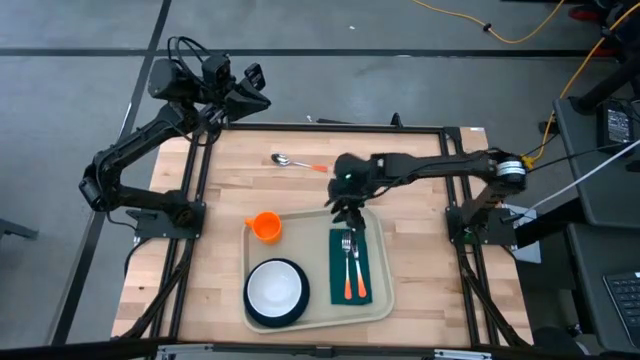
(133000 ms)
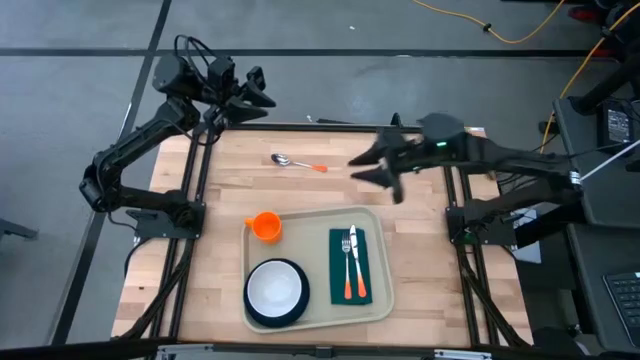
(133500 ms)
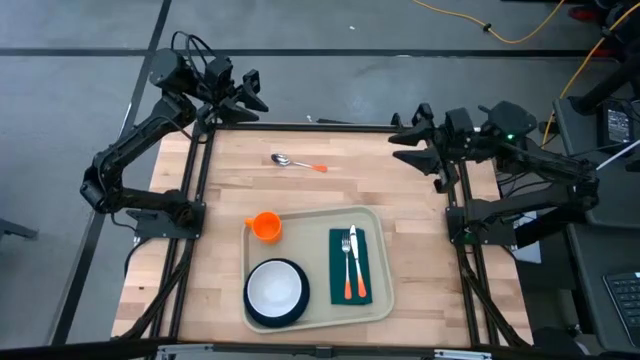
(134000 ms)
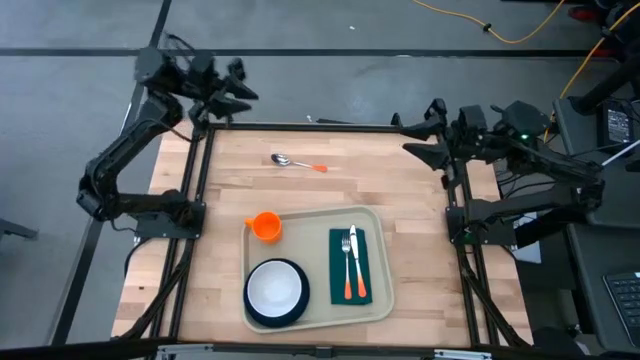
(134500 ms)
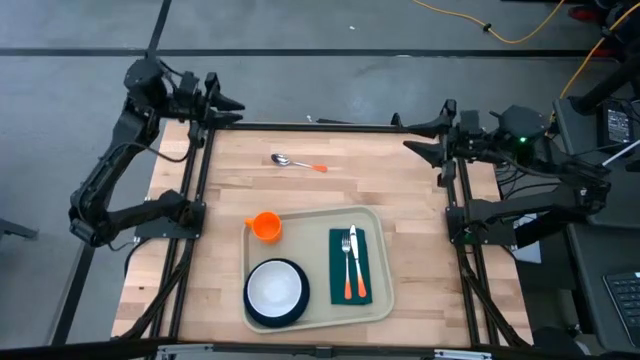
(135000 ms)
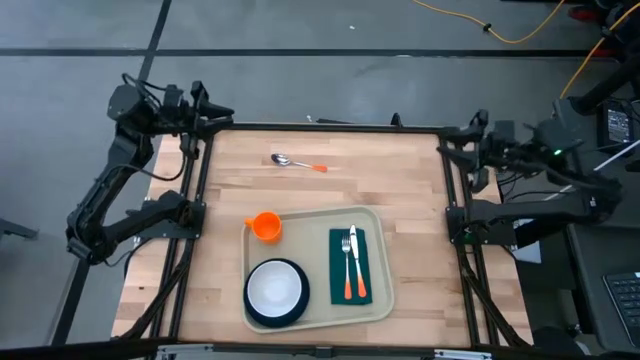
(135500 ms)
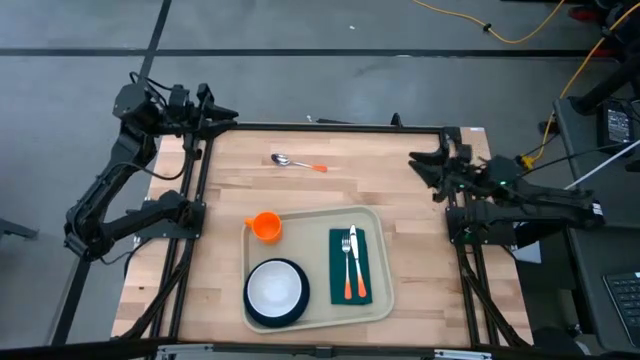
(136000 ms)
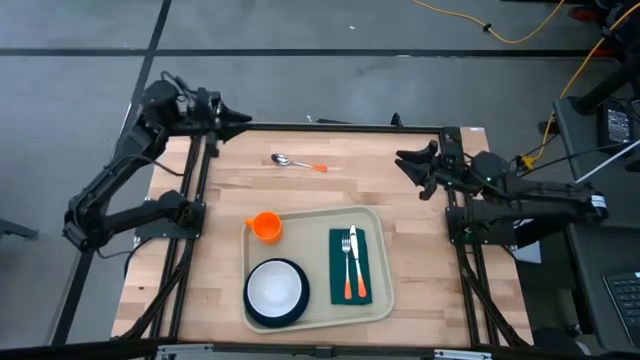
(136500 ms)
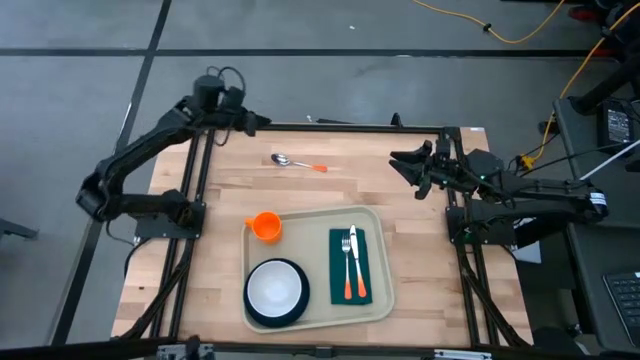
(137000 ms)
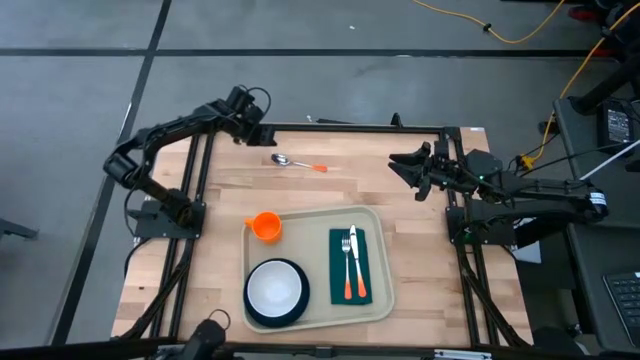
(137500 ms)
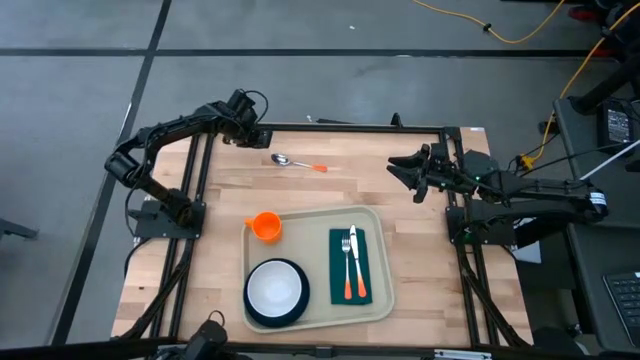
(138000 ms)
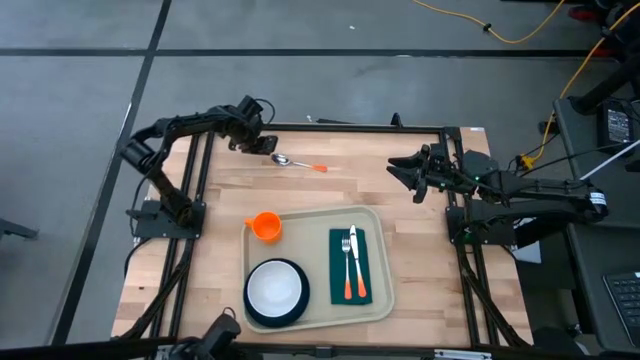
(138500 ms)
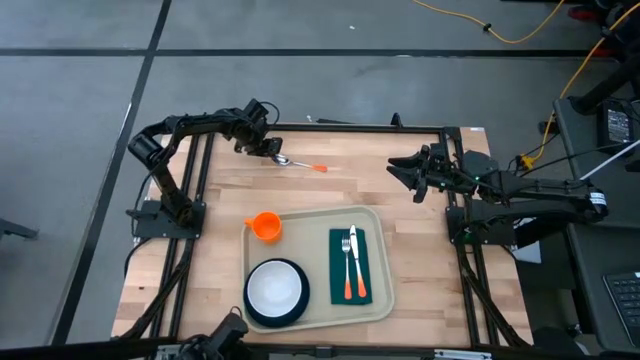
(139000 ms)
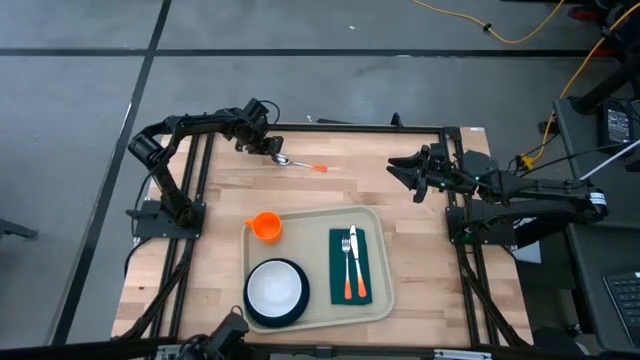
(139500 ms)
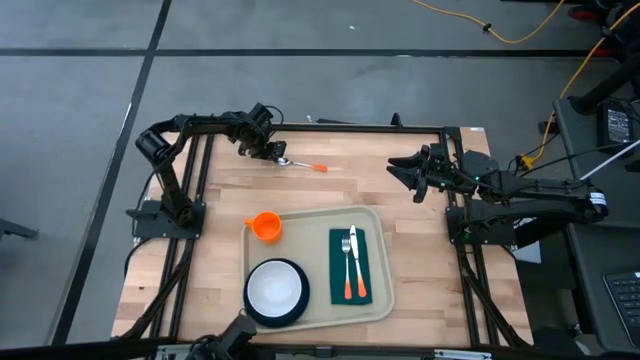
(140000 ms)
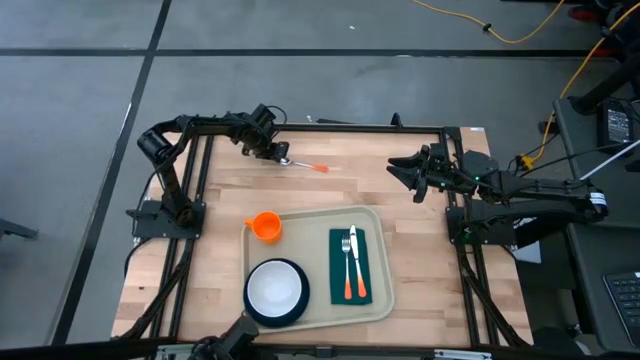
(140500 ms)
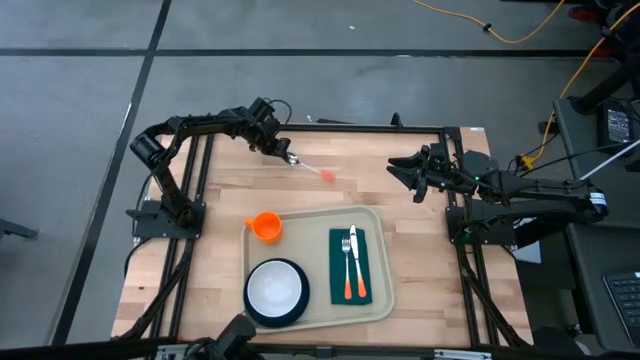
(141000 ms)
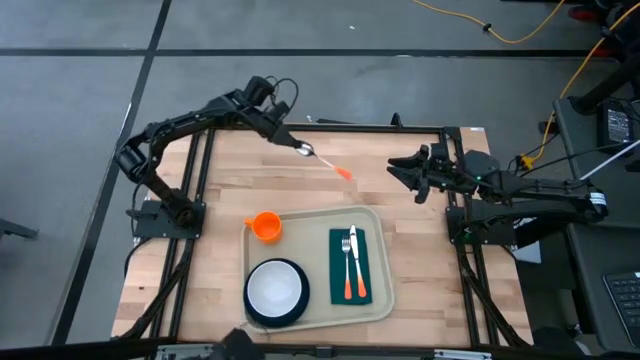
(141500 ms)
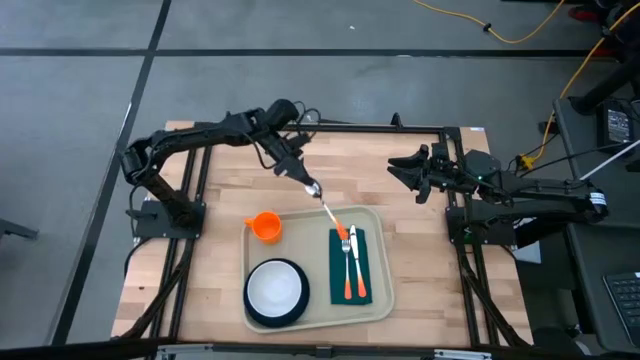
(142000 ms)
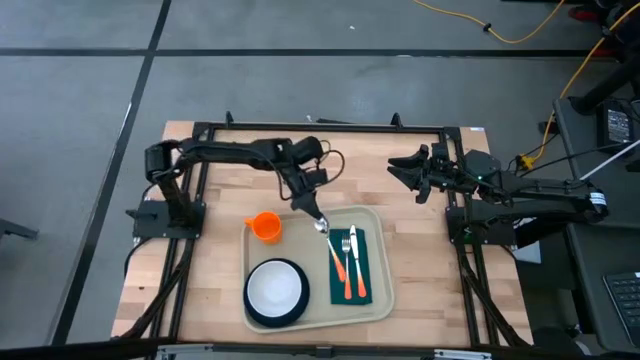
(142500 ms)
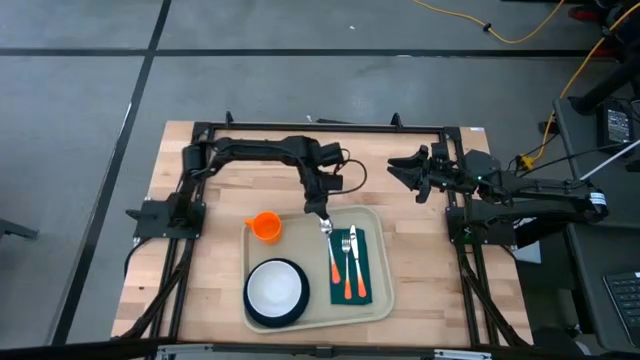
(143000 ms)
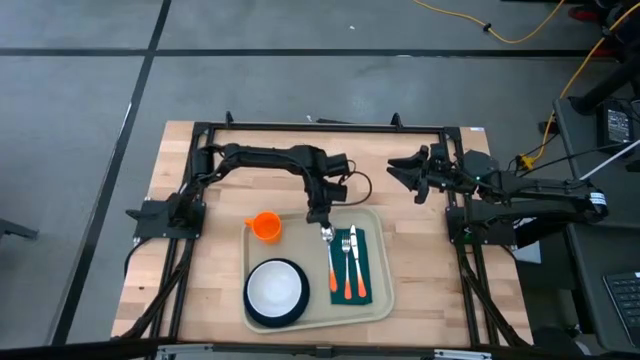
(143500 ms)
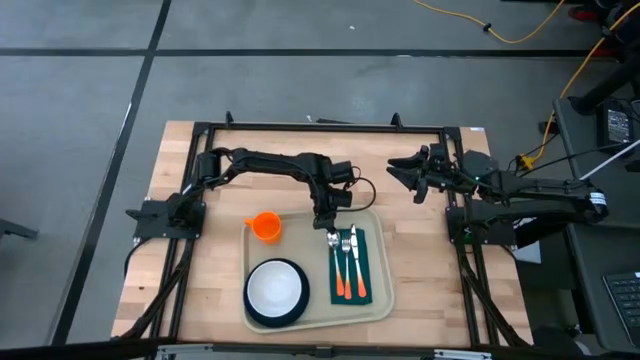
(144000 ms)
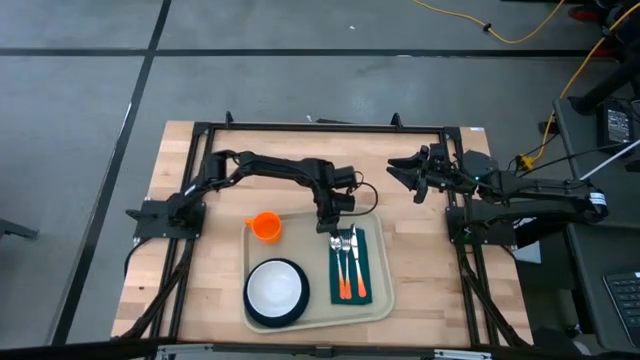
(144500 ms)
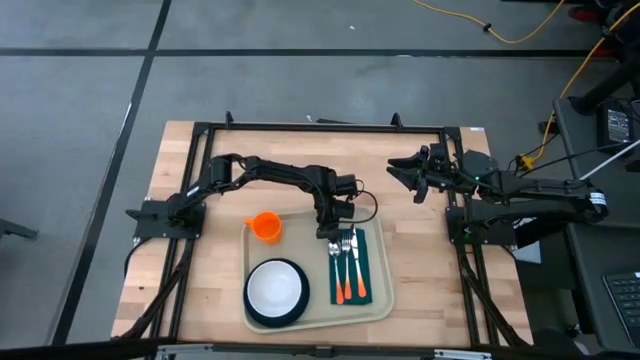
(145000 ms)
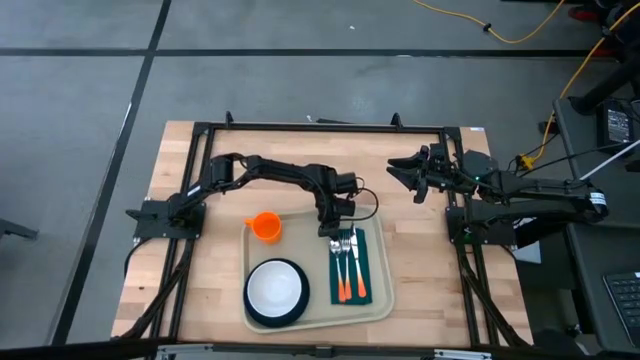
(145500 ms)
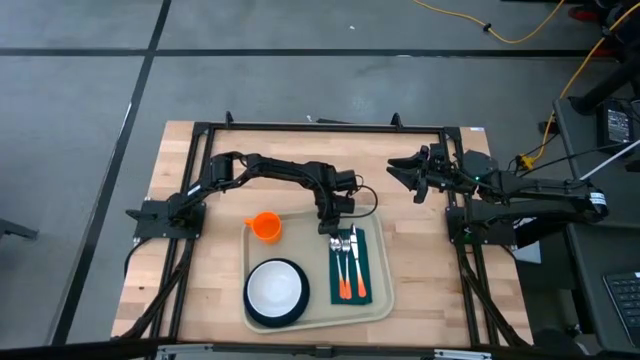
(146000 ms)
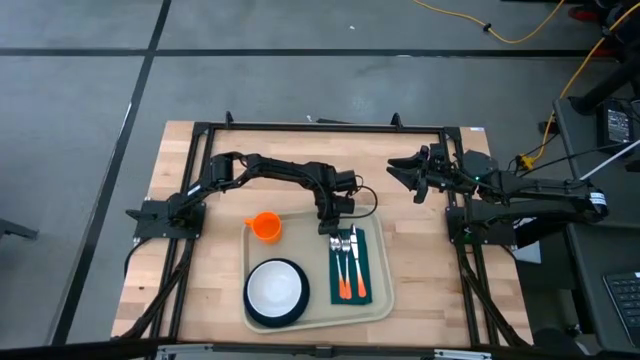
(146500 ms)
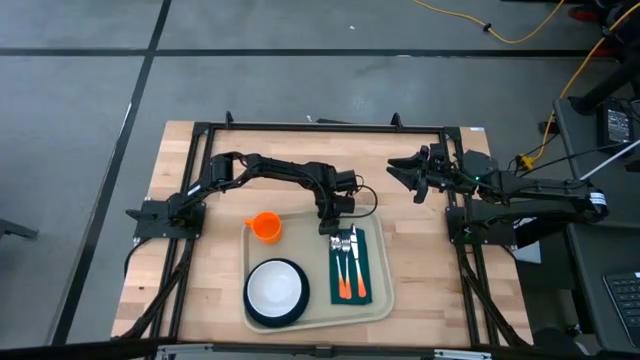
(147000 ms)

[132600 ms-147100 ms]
Task: Set up tray
Put the orange spoon to the left of the orange fork on the dark blue napkin on the gray serving tray

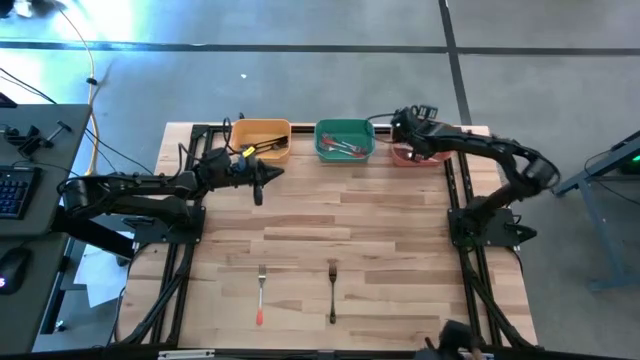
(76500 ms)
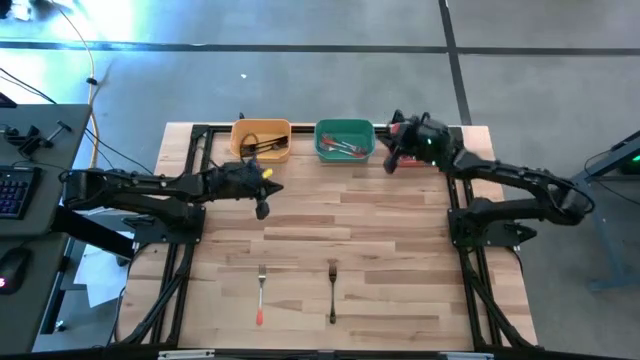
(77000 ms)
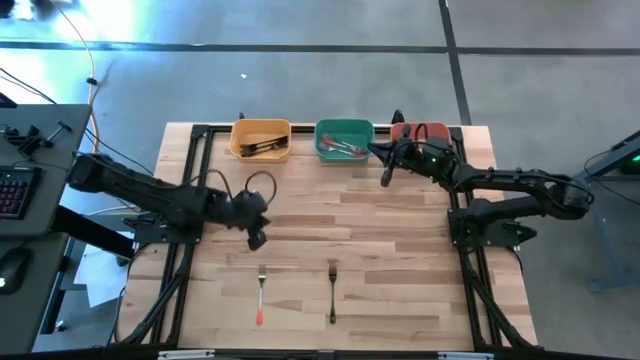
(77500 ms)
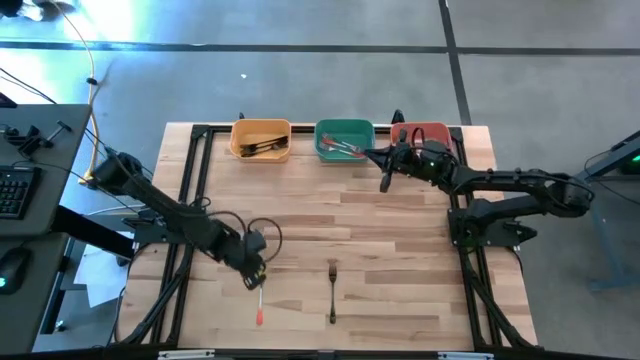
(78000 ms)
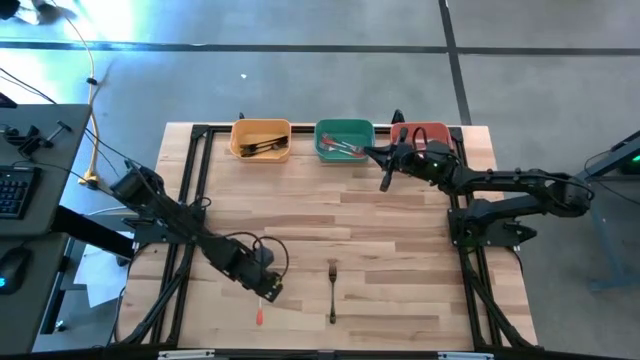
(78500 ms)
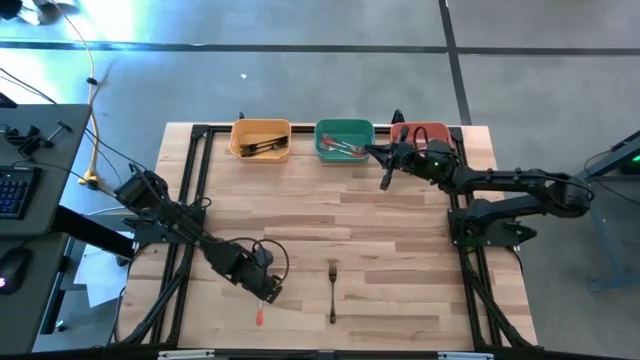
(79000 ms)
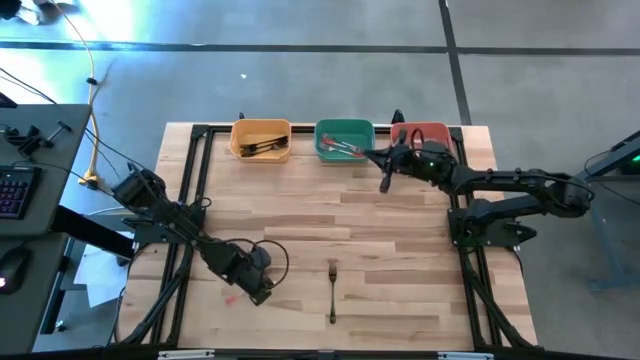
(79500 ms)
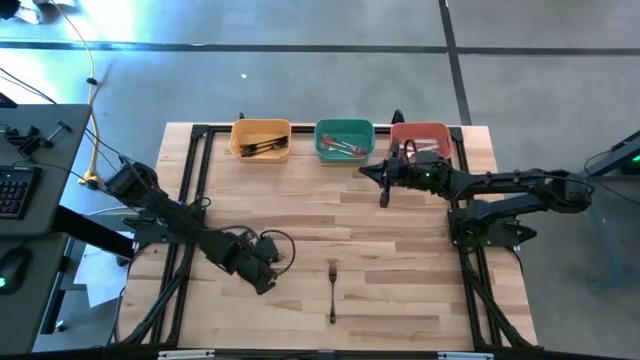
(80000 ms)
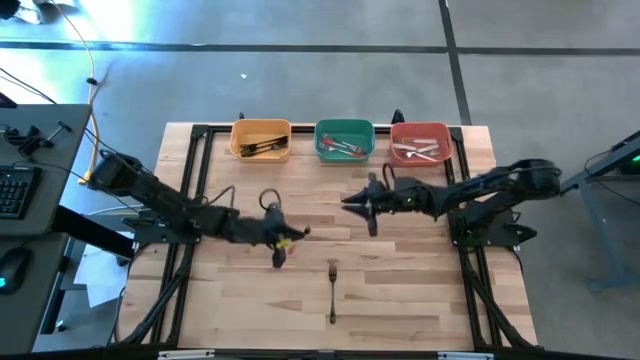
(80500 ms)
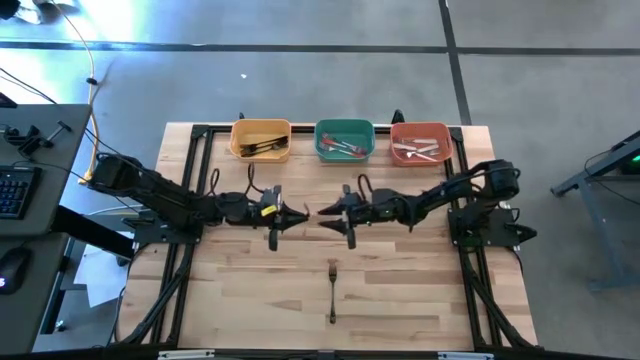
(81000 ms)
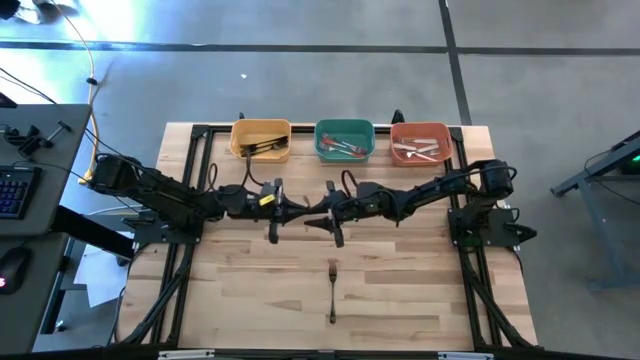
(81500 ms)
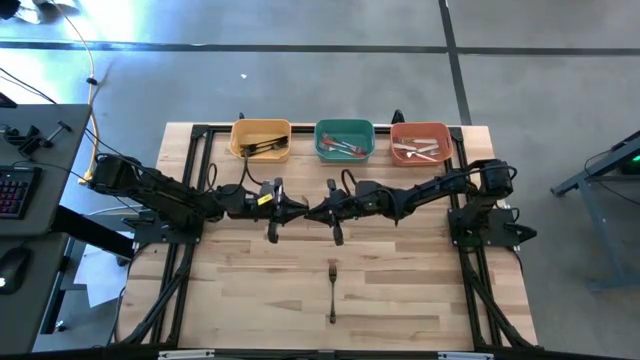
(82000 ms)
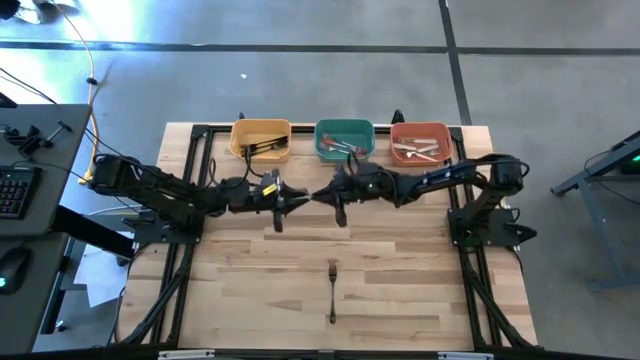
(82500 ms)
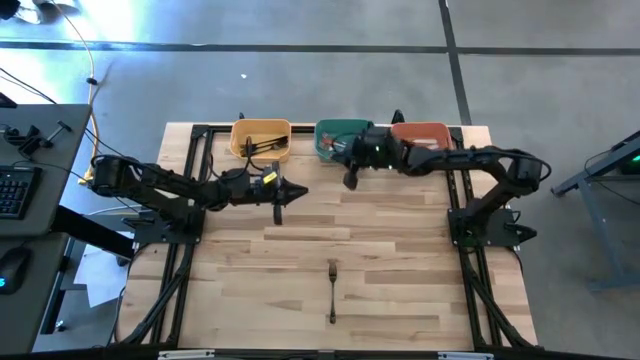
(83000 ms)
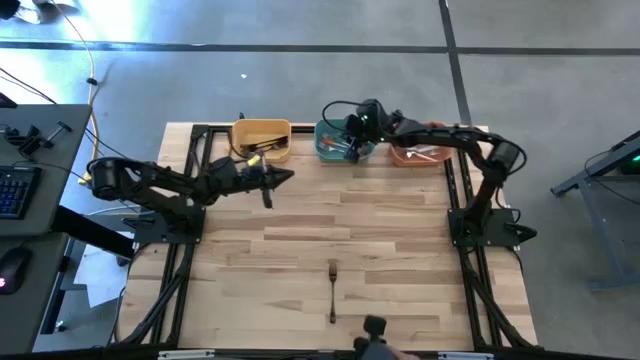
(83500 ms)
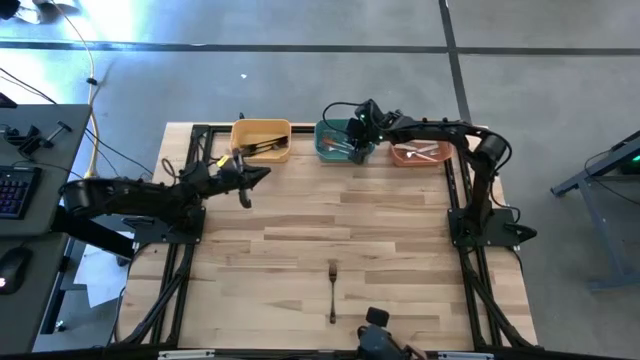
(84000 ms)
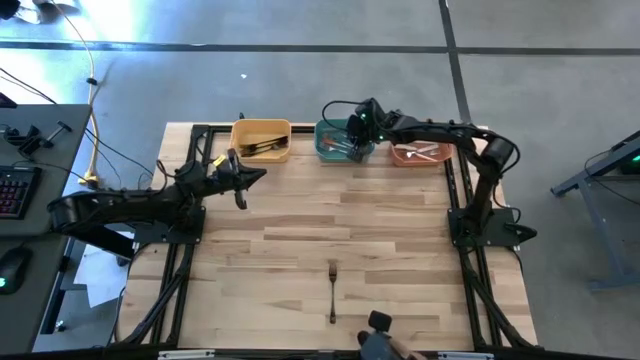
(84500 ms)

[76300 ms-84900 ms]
Task: Sort silverware by color (type)
Put the orange fork into the blue bin
